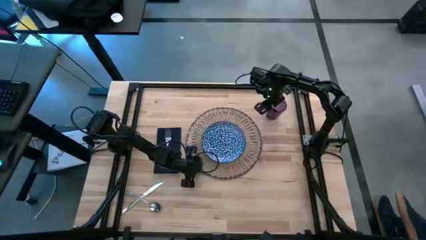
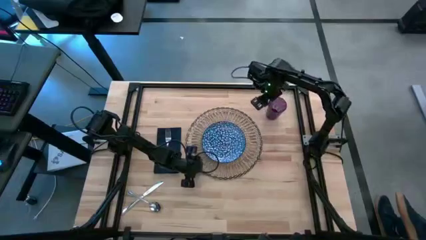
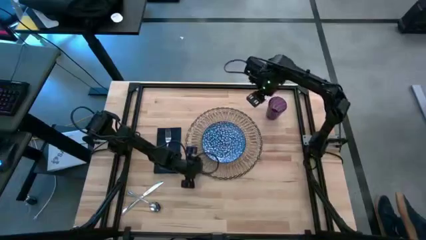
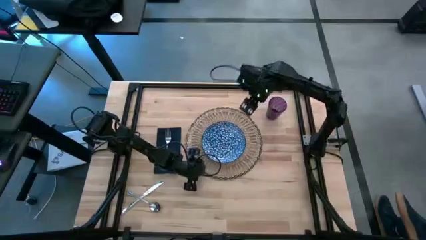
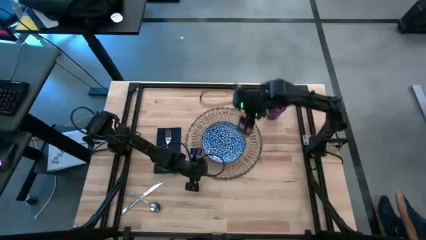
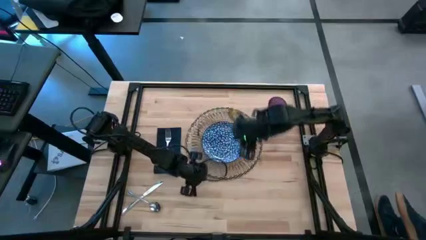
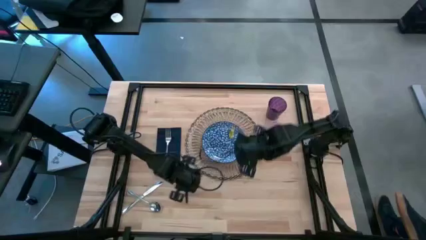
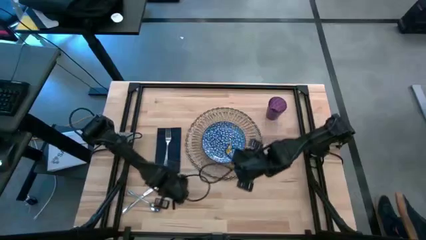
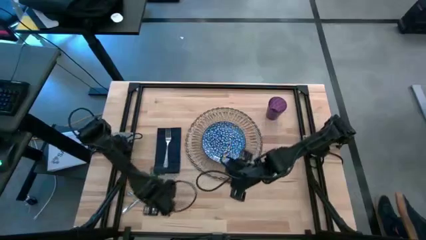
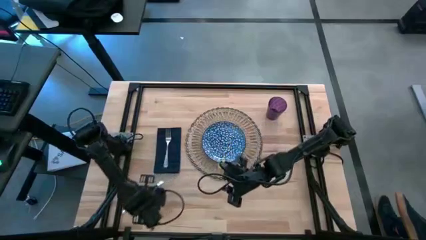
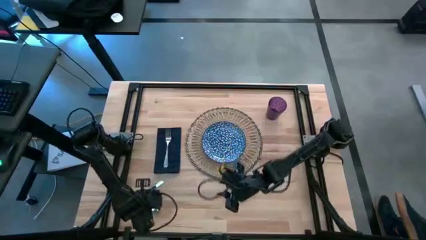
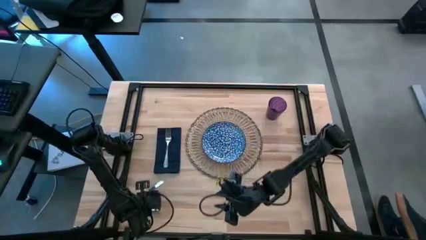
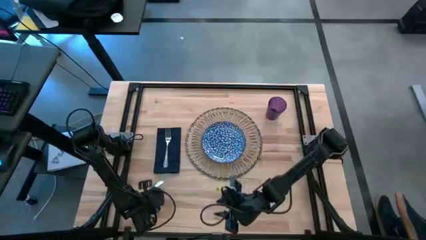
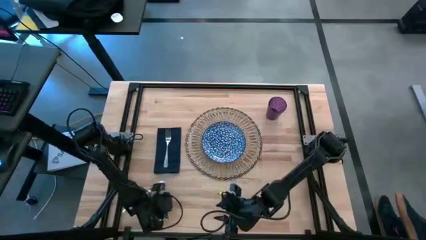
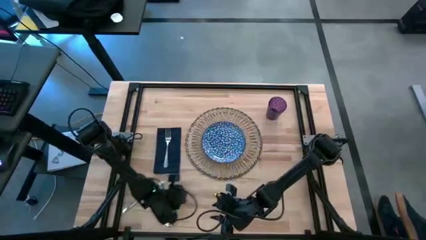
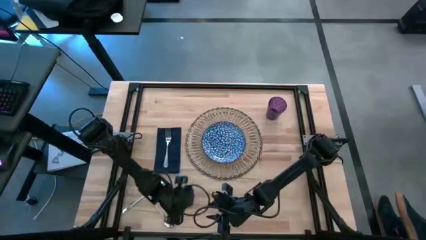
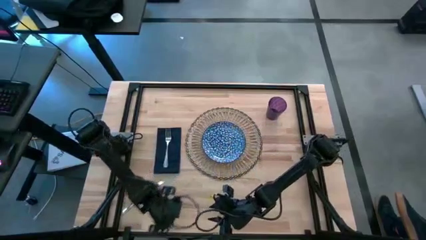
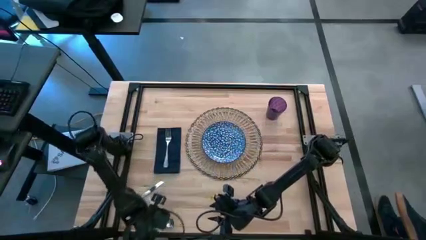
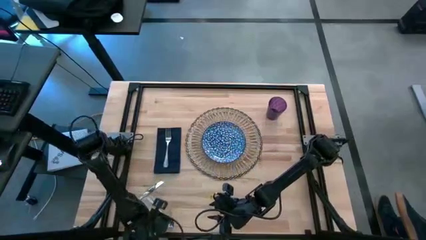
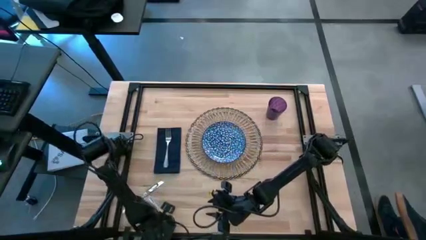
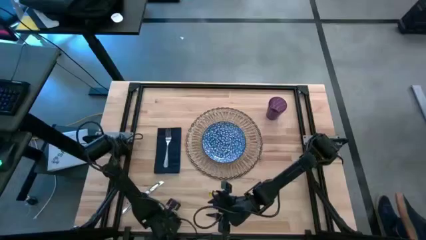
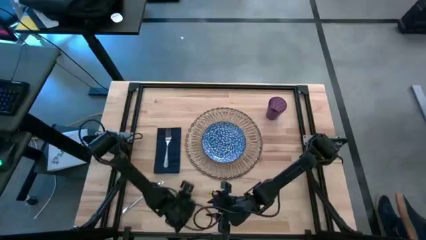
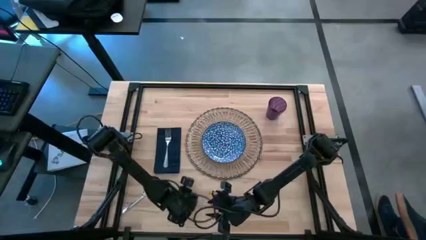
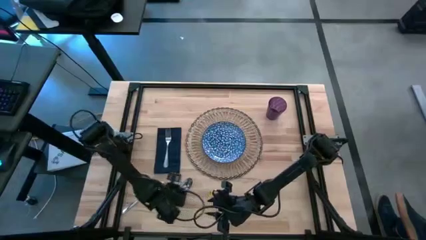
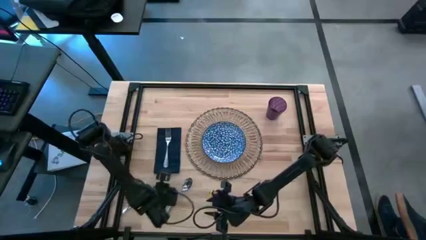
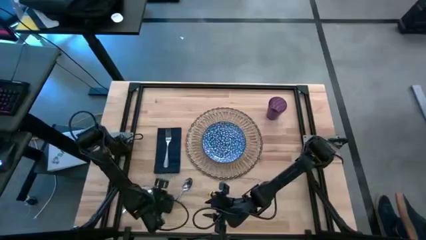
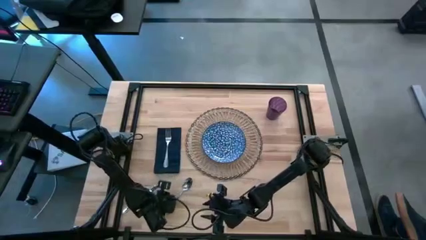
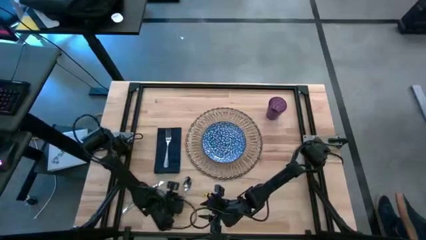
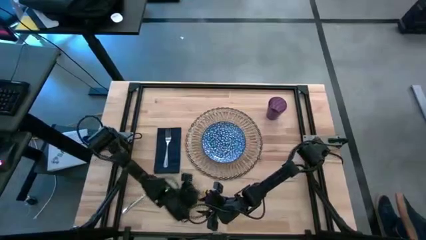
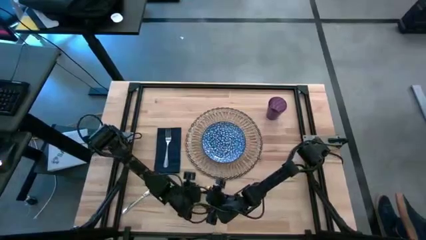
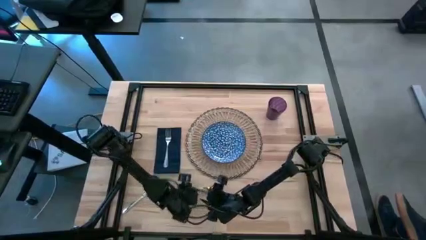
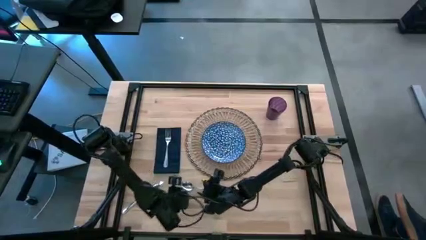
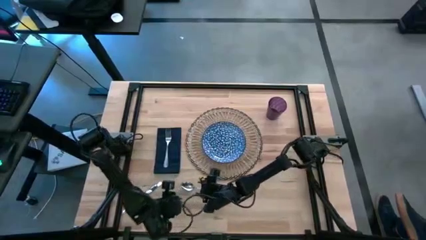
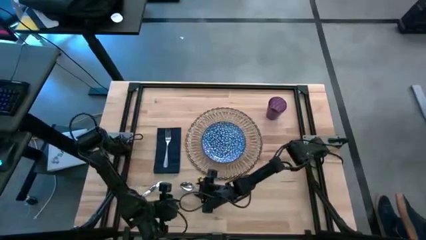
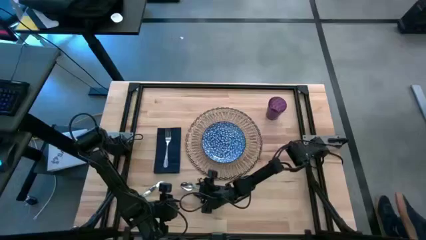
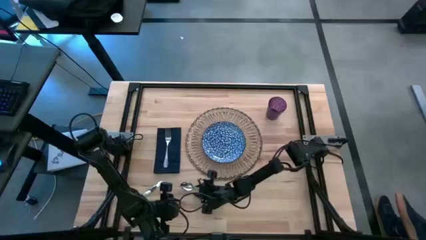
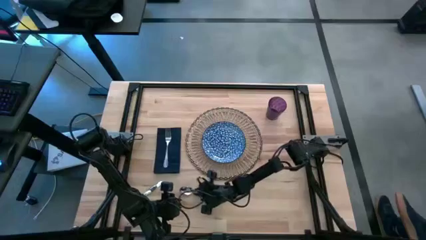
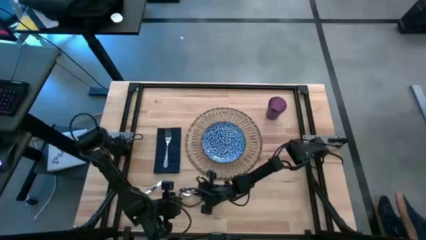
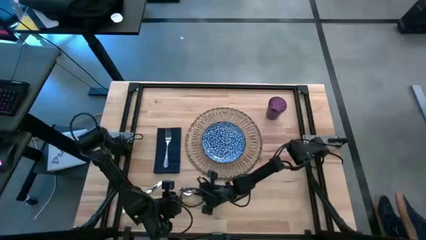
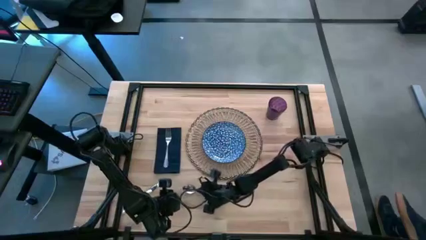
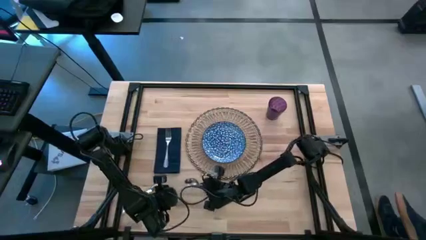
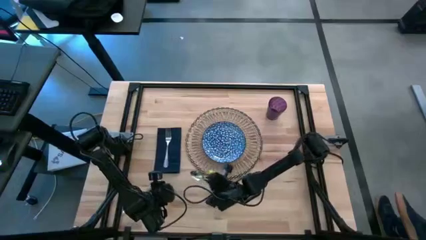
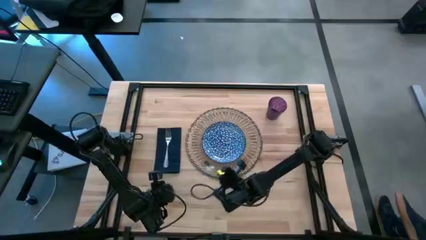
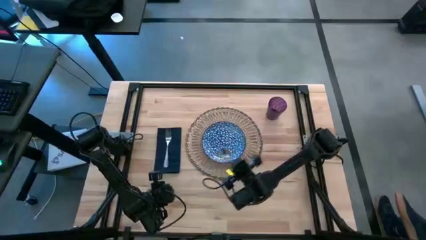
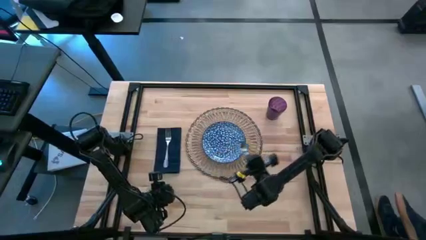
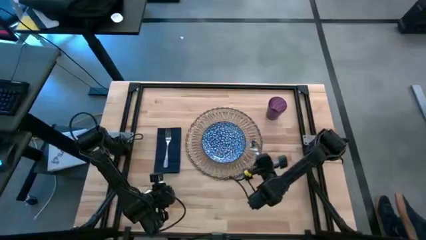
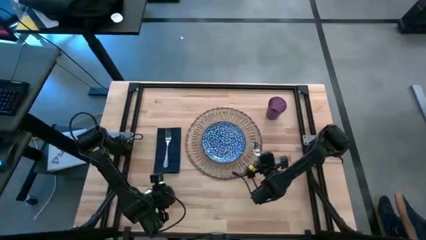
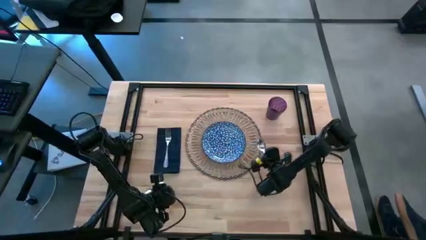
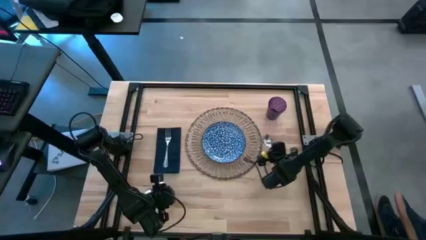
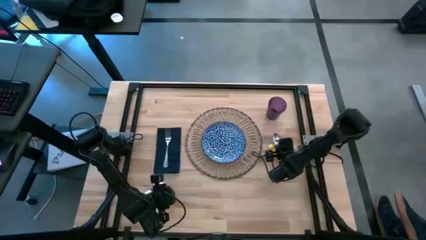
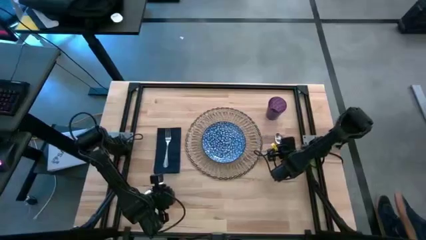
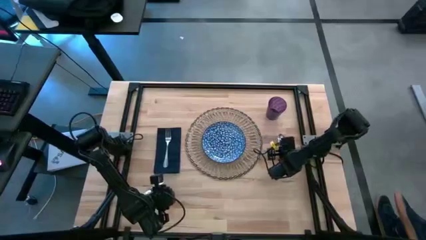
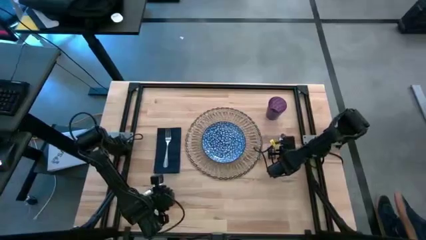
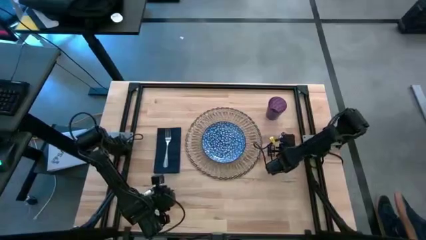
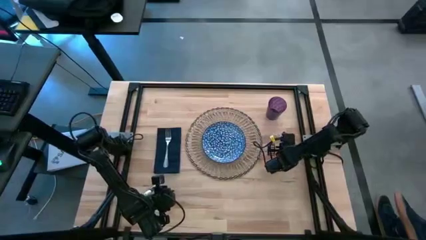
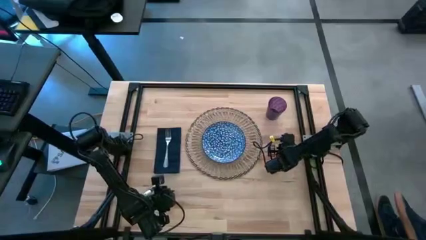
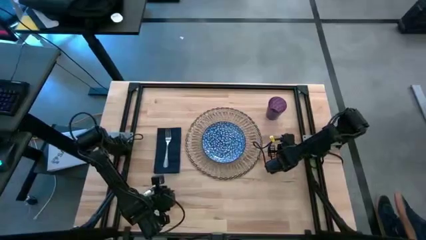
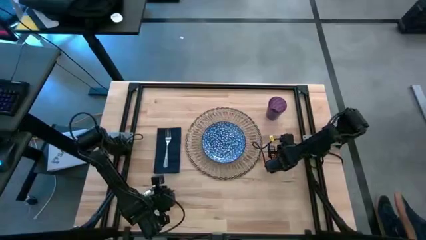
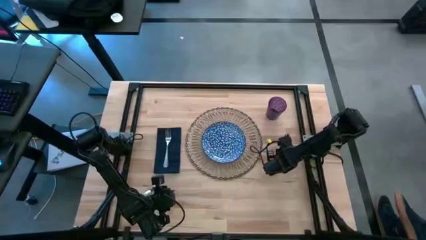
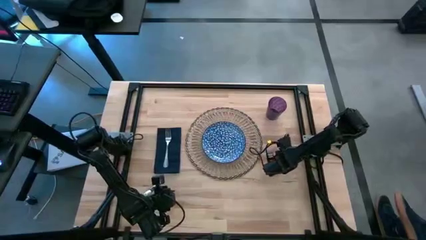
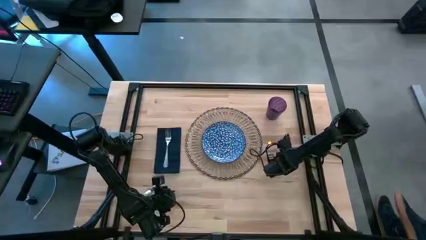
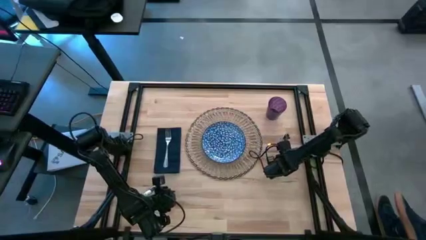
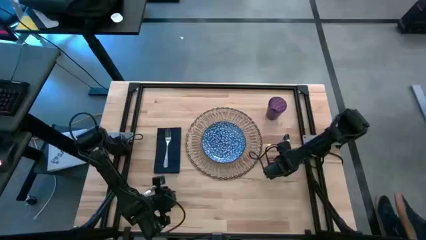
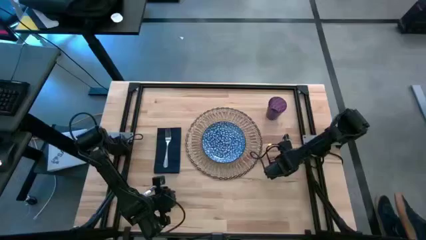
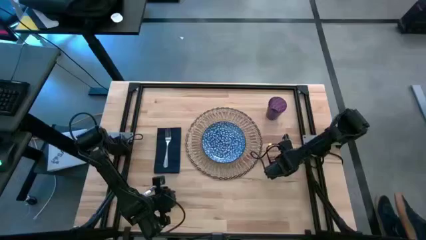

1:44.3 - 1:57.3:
Task: Set table place
Put the silver spoon to the right of the brown placemat

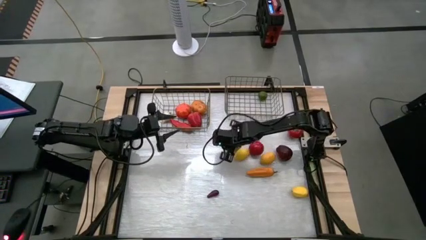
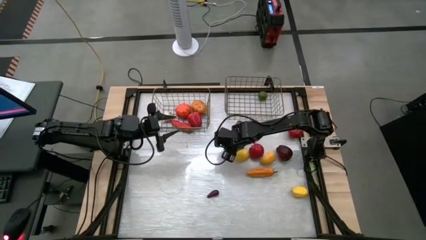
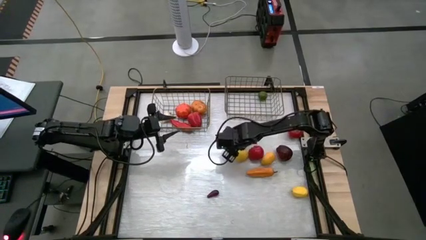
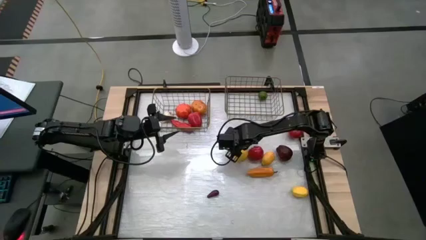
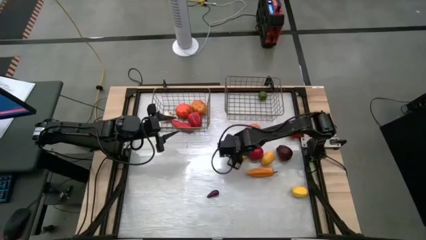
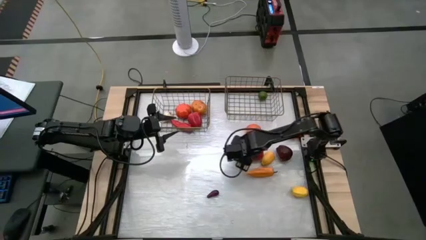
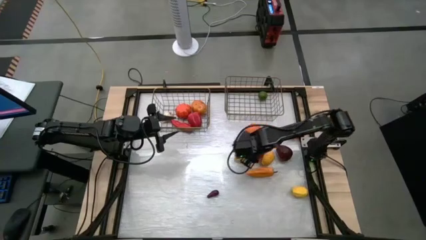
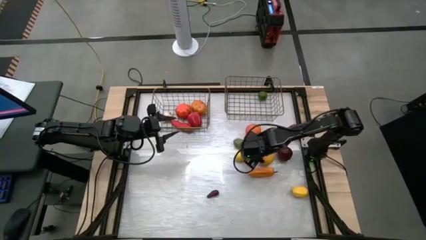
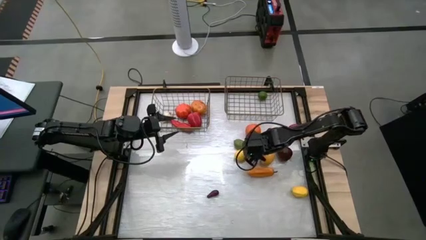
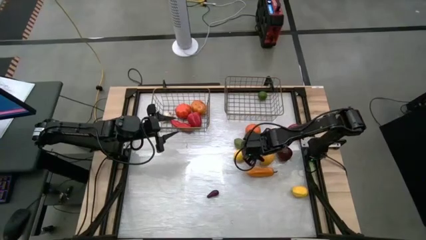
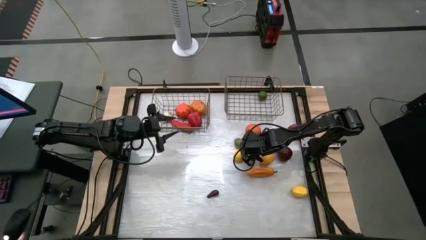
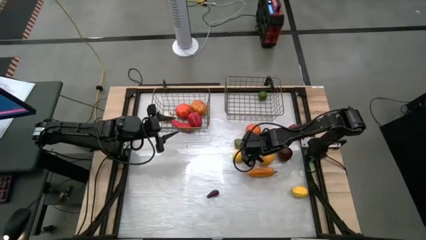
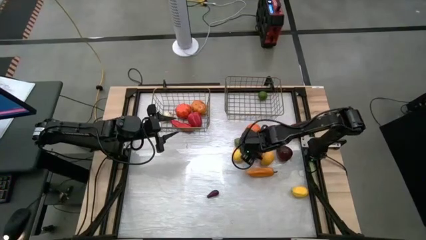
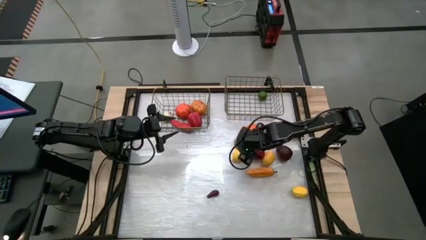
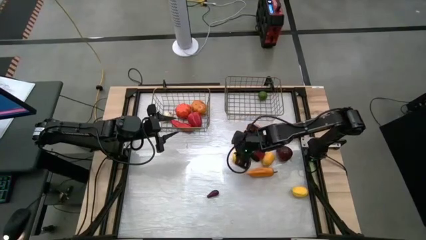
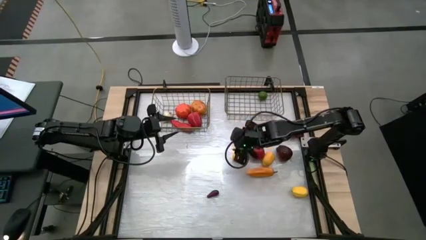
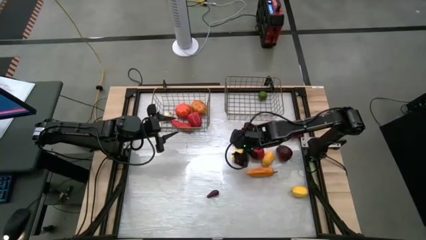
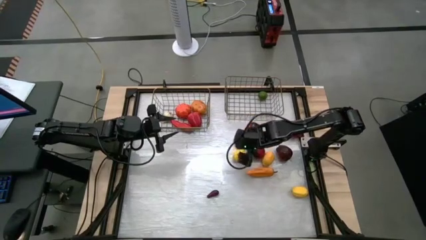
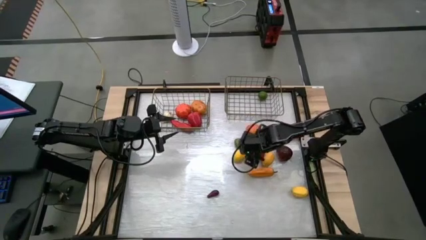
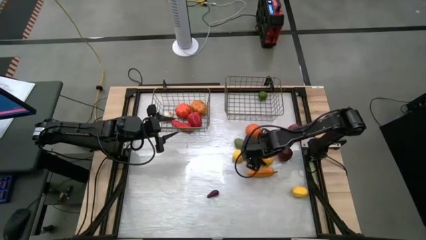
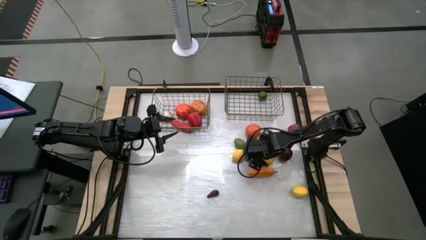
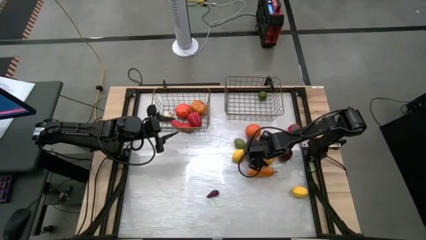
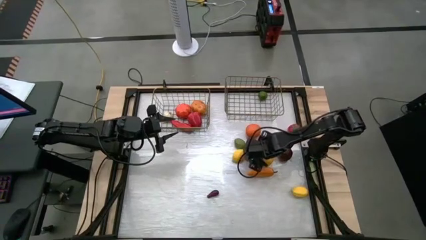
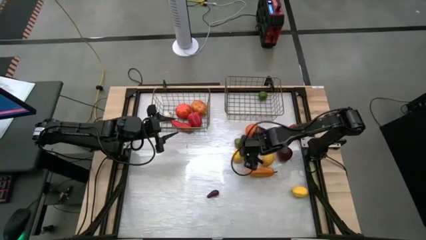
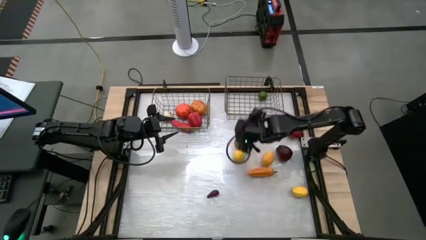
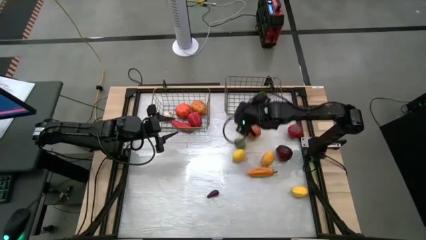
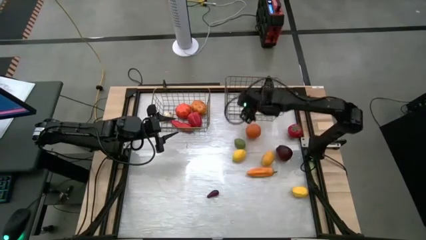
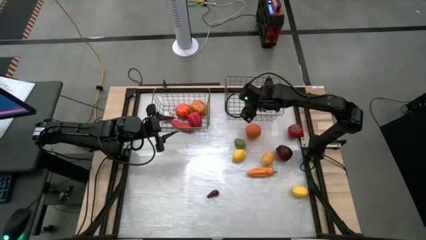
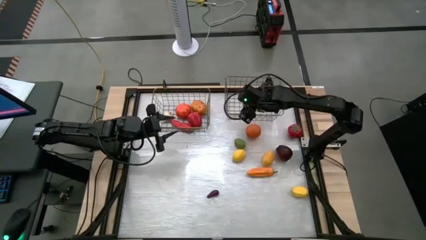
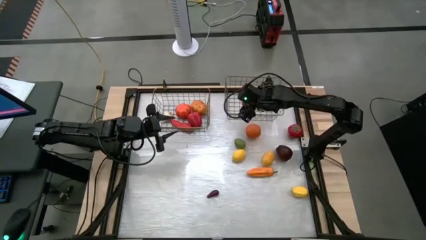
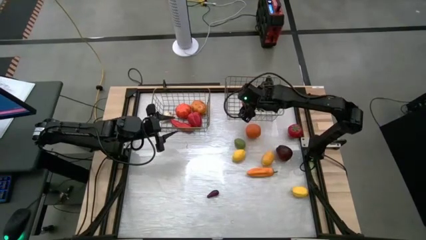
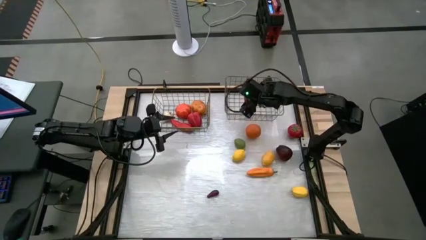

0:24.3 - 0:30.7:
Task: Sort produce into baskets
Put the bottom tomato into the right gold wire basket
